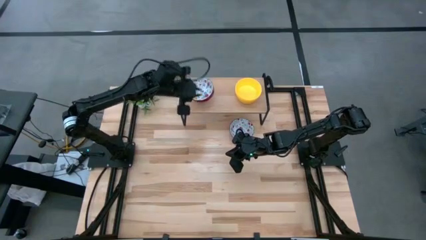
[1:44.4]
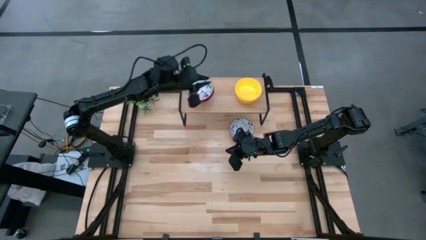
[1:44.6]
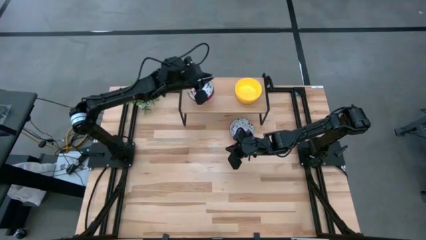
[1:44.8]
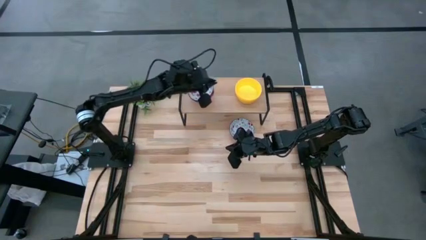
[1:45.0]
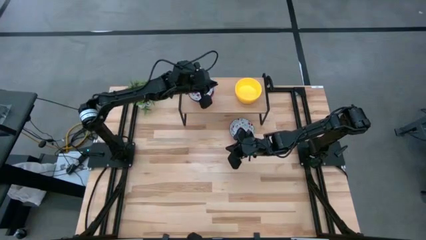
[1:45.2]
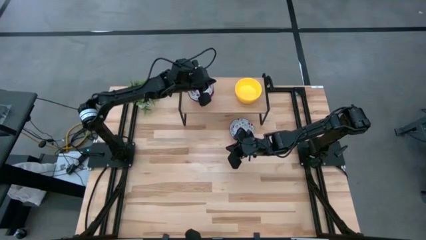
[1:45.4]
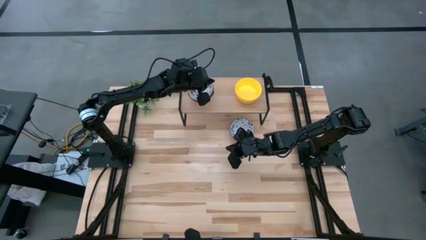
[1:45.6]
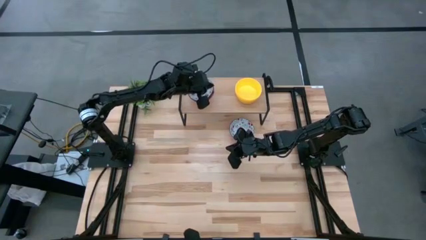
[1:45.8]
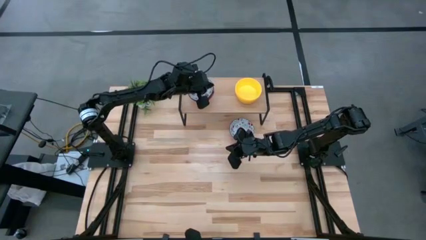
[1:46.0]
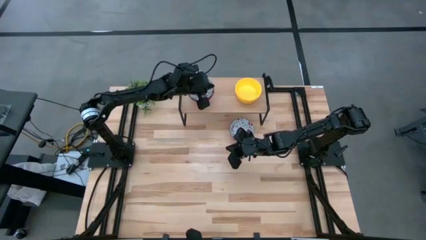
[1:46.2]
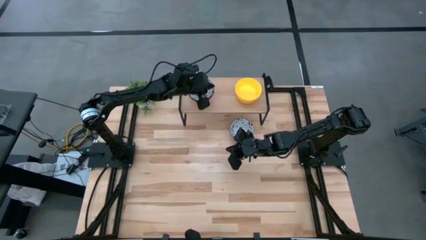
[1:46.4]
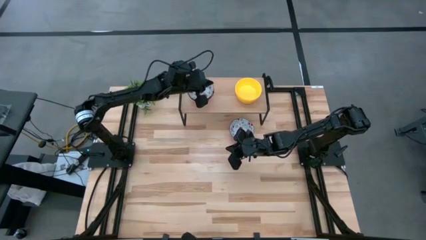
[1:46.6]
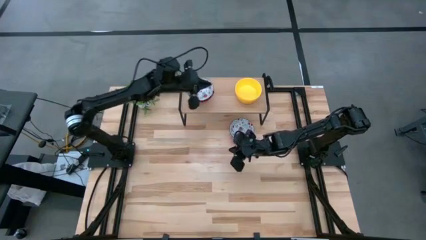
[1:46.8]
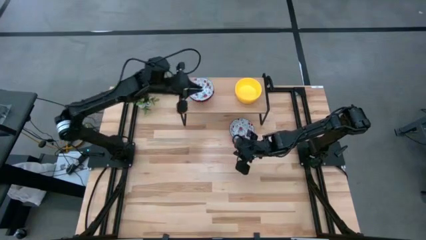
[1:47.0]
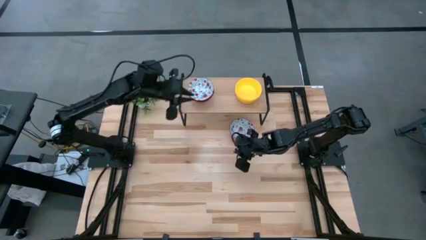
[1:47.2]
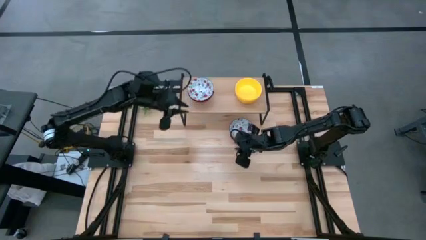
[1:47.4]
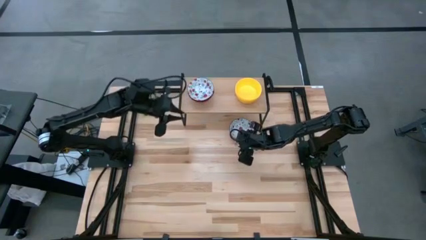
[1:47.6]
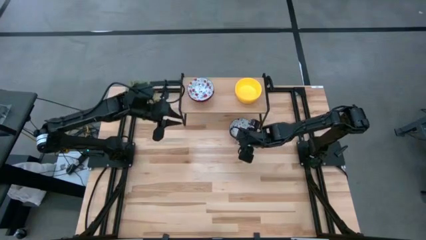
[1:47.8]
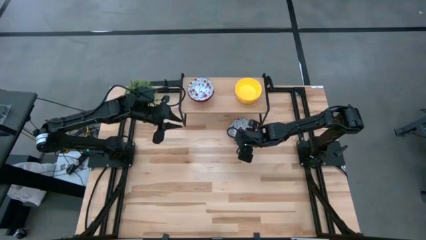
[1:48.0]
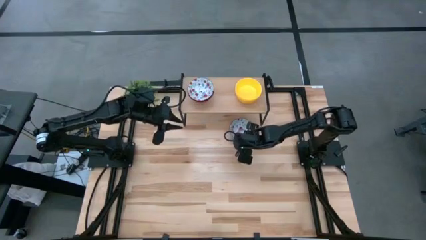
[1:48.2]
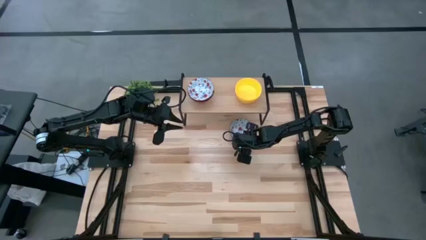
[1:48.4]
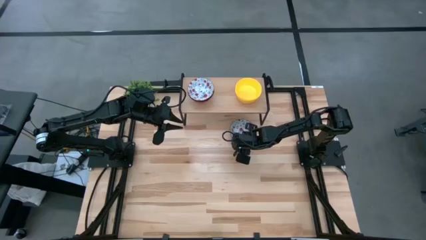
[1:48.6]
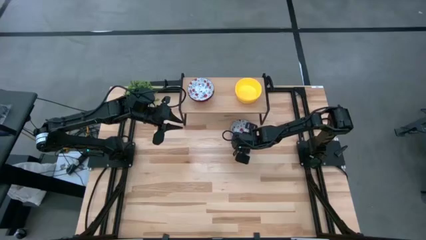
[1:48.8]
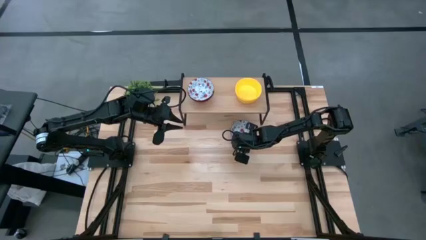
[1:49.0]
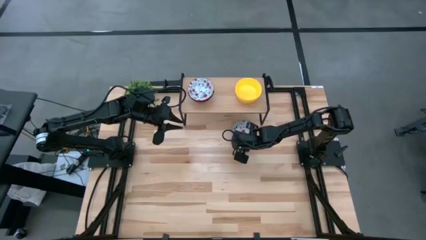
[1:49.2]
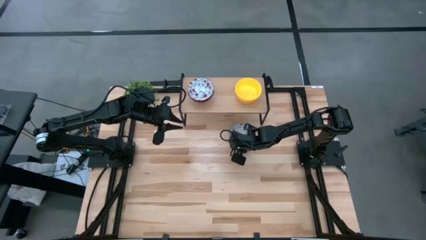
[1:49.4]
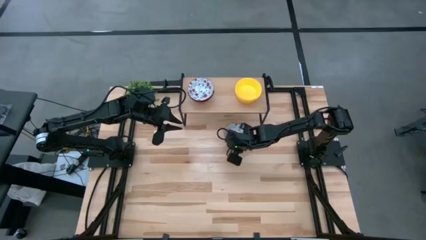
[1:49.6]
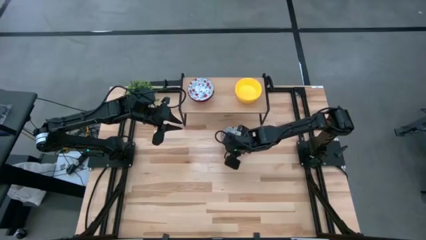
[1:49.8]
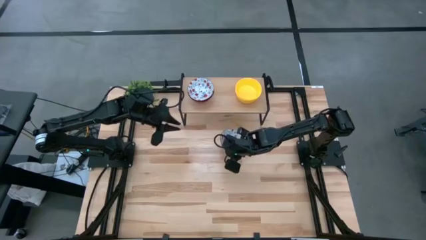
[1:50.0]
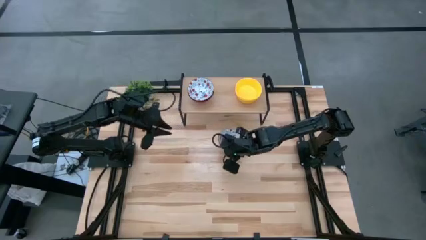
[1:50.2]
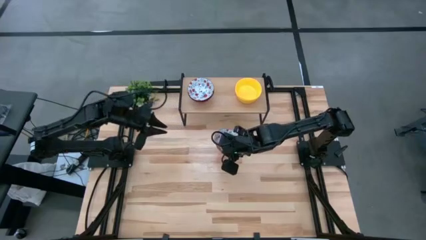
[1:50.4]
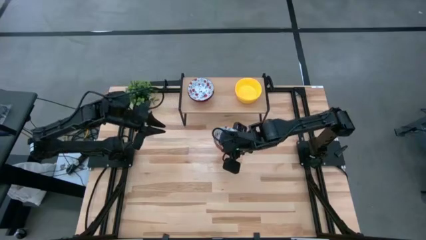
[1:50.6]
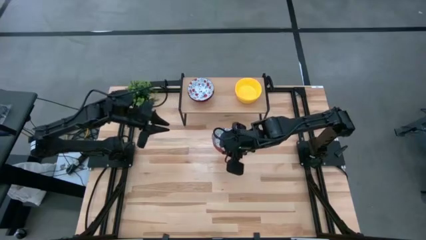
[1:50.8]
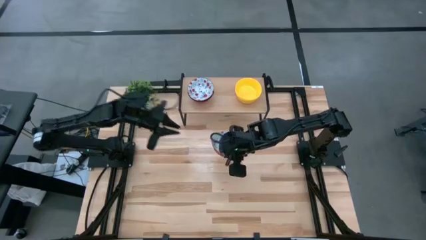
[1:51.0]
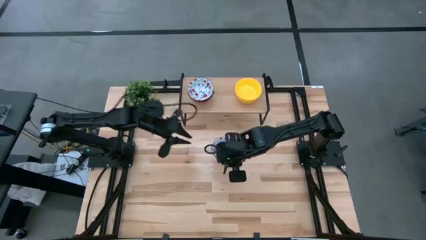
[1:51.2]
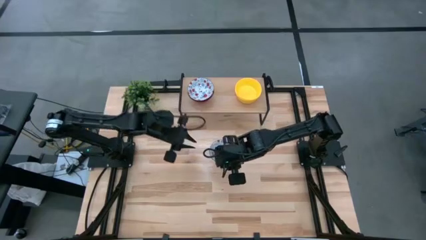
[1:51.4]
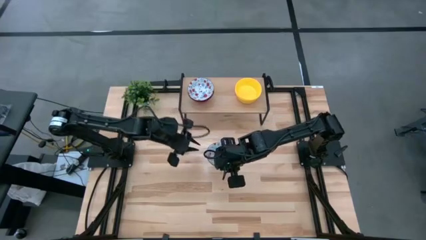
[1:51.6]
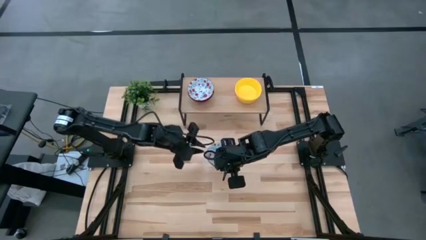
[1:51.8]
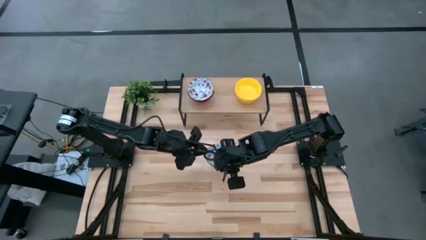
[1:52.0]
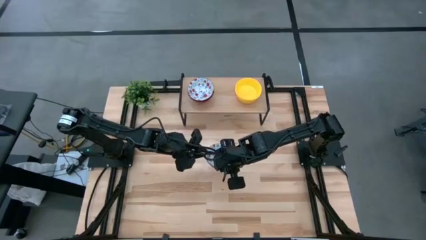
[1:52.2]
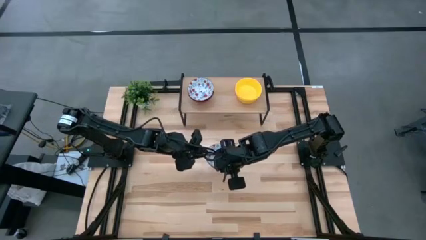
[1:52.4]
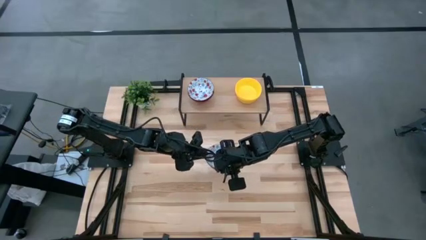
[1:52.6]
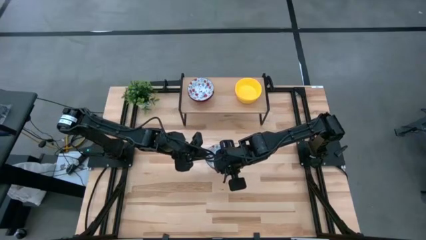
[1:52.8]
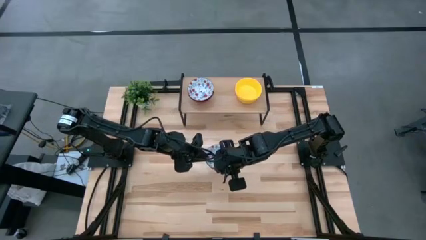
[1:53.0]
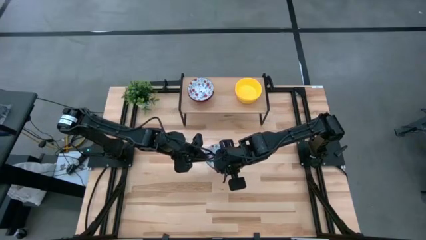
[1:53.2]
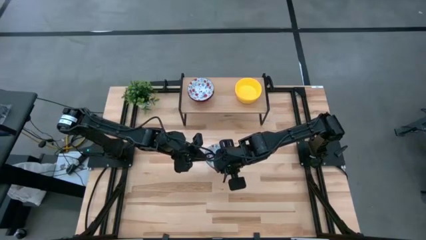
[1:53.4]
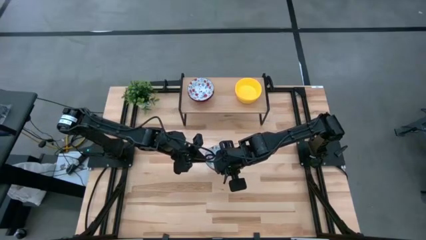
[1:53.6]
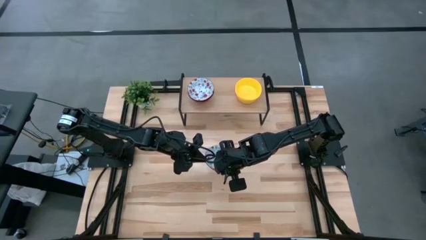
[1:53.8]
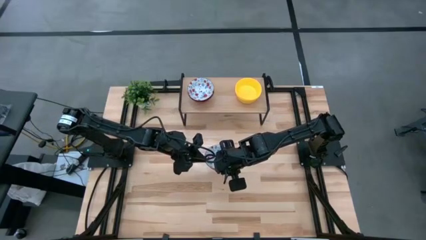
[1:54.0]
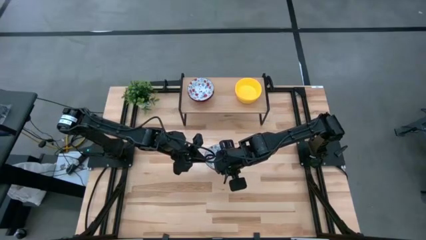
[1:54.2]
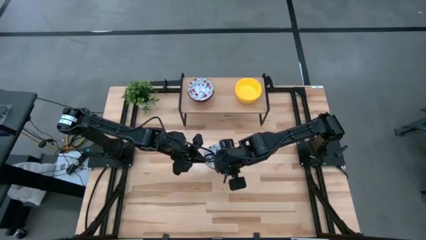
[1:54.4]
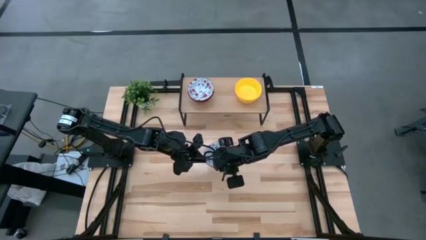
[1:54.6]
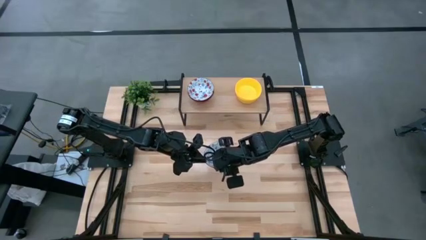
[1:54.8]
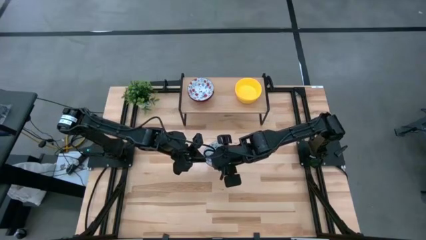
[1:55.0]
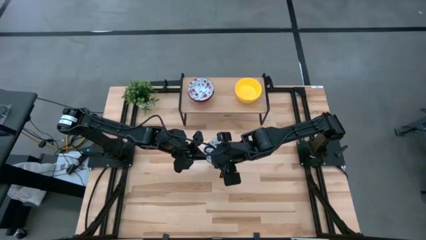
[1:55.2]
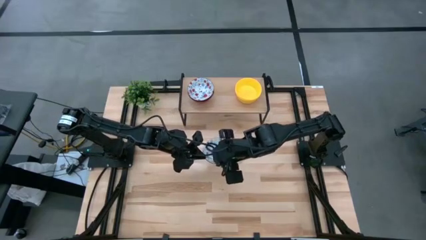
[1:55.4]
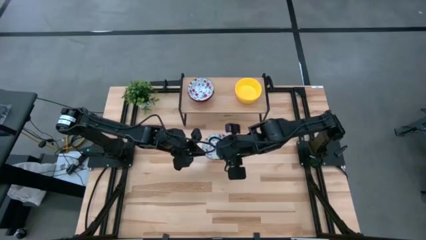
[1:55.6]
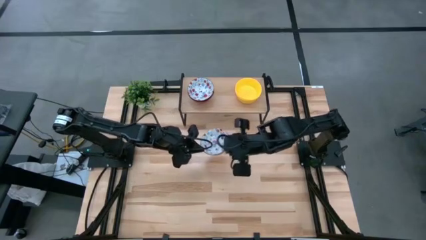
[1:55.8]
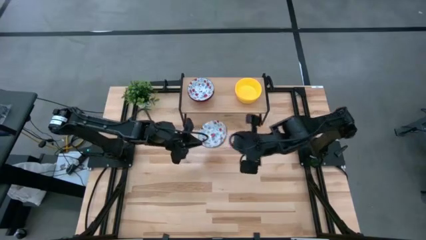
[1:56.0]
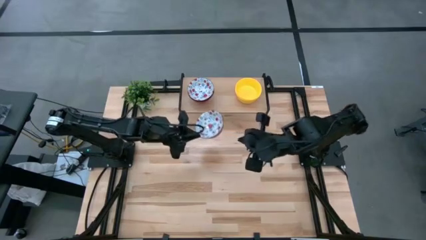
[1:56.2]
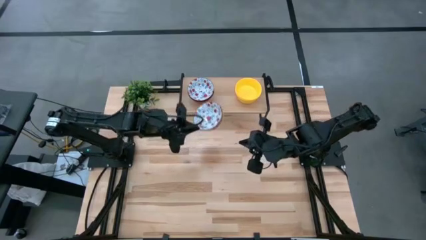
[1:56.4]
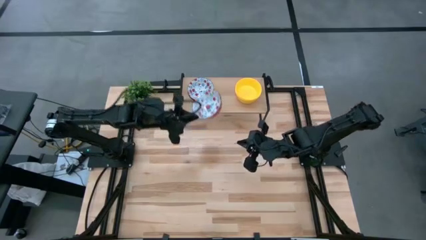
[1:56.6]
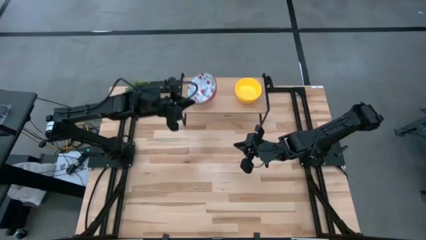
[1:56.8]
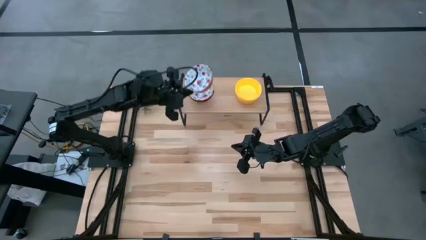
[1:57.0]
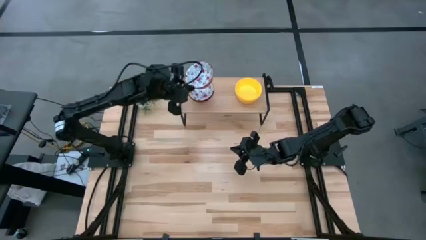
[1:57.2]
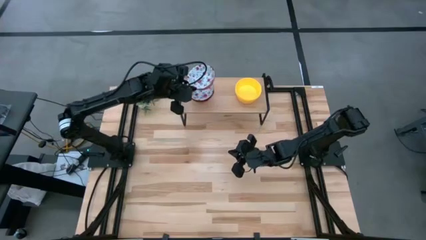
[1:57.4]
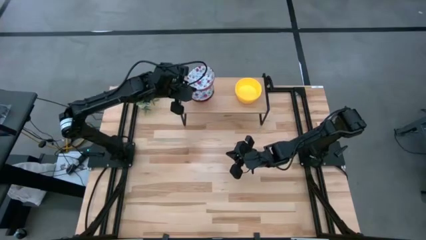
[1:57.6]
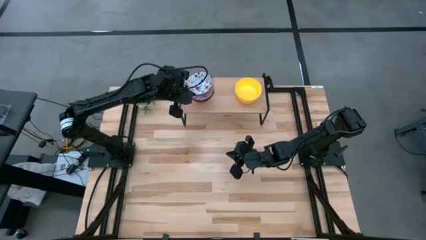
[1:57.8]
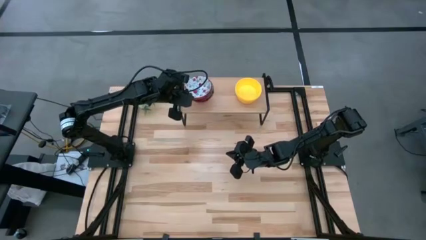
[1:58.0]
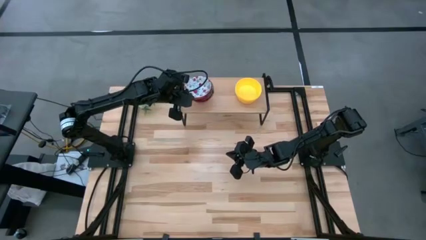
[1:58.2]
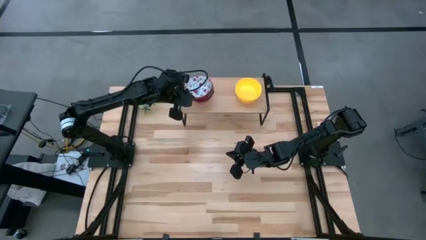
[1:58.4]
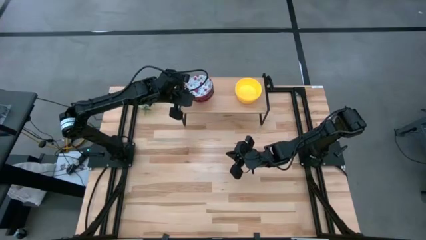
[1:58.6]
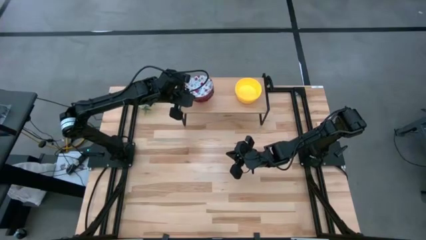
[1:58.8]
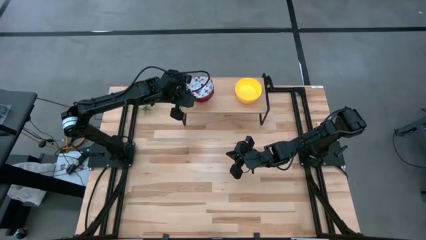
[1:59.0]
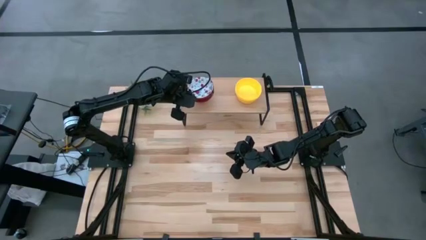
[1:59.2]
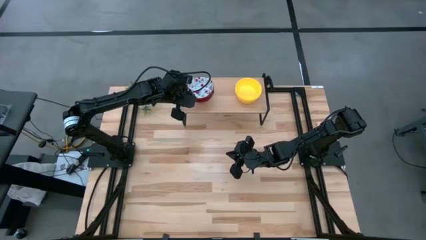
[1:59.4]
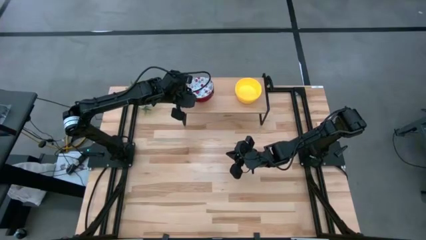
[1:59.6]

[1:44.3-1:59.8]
Task: Pick & Place Mini bowls
Stack the red bowl on the other stacked red bowls on the shelf
